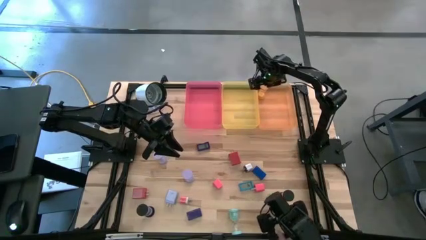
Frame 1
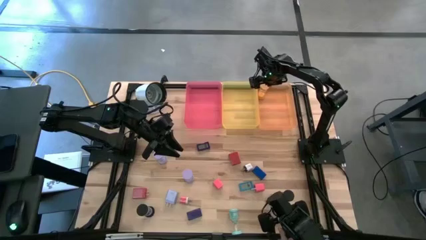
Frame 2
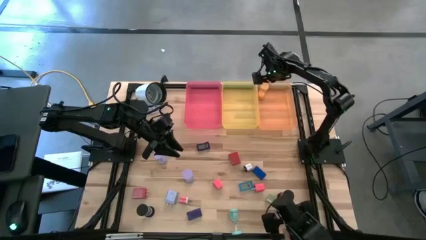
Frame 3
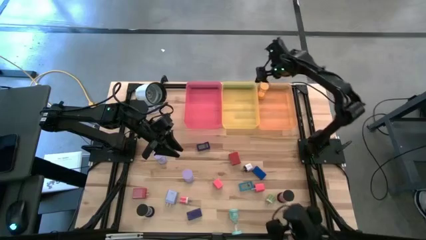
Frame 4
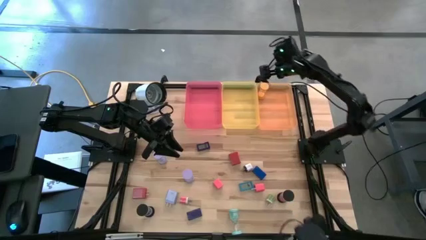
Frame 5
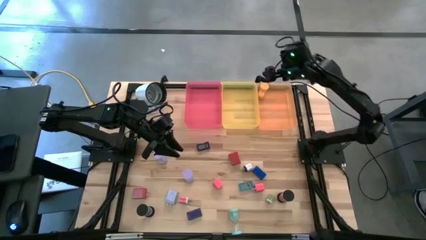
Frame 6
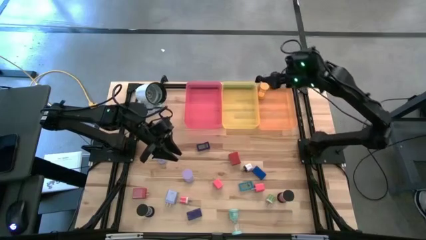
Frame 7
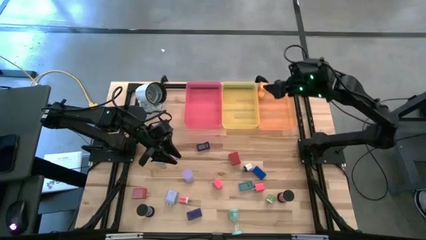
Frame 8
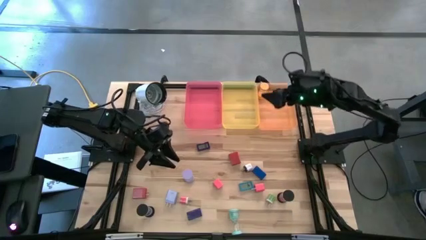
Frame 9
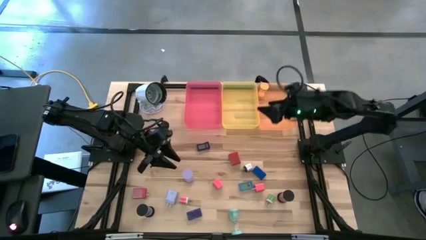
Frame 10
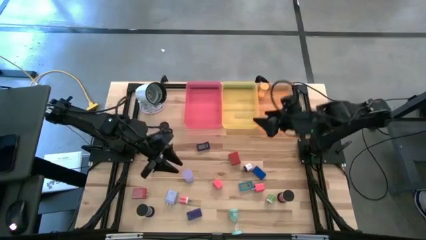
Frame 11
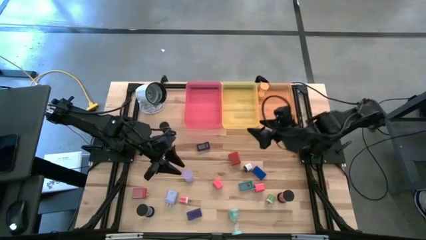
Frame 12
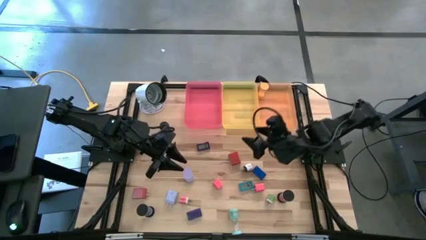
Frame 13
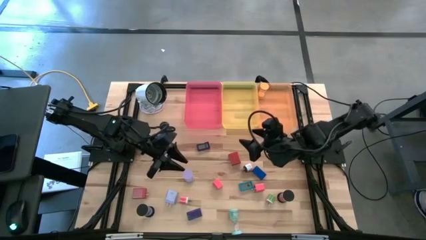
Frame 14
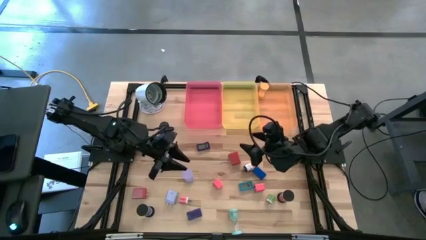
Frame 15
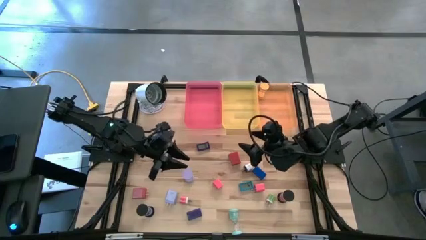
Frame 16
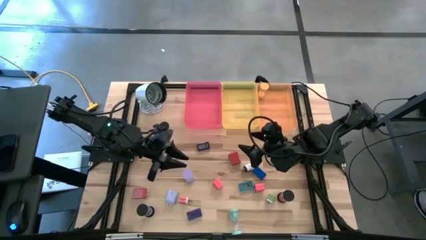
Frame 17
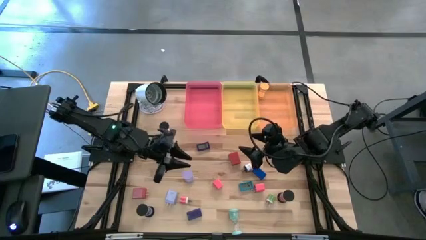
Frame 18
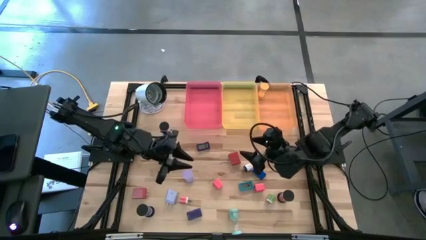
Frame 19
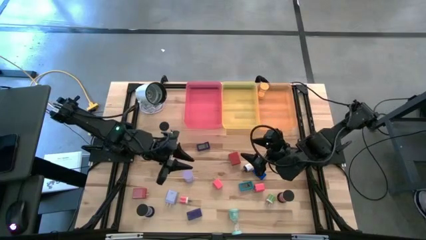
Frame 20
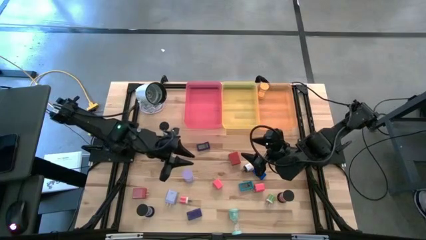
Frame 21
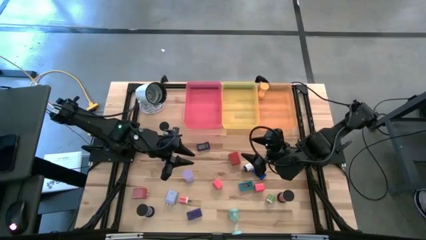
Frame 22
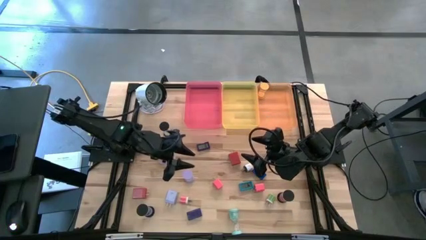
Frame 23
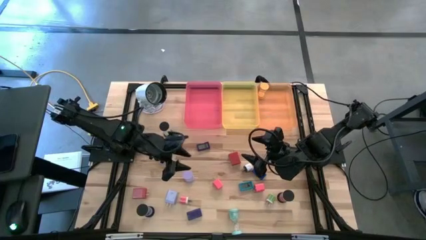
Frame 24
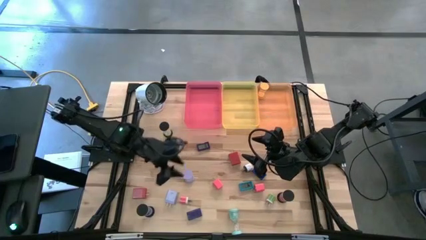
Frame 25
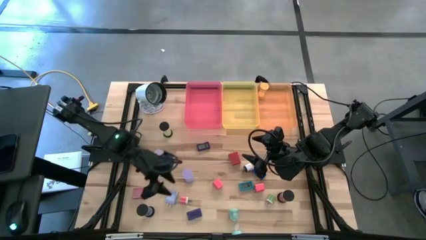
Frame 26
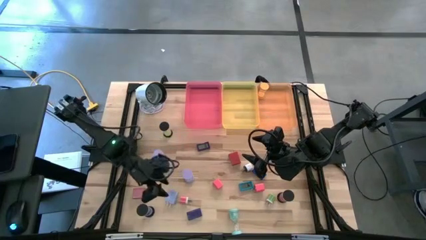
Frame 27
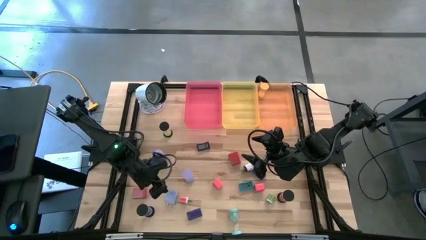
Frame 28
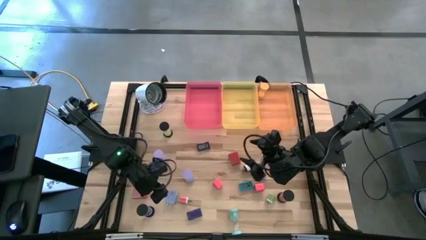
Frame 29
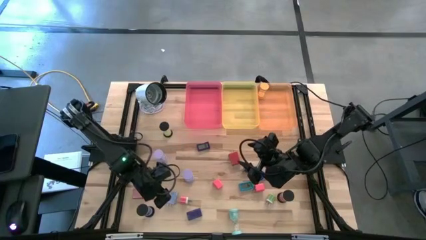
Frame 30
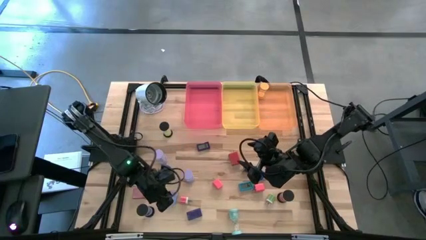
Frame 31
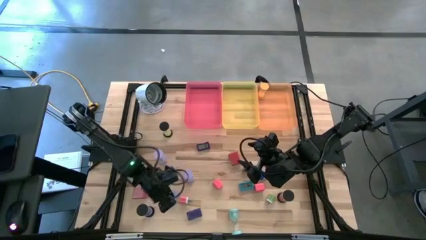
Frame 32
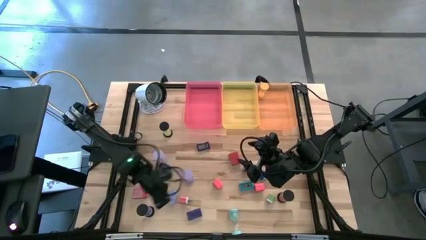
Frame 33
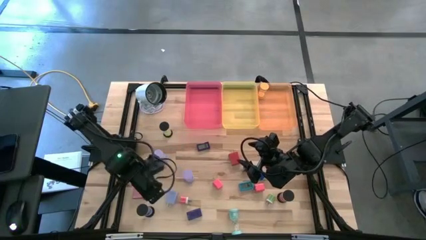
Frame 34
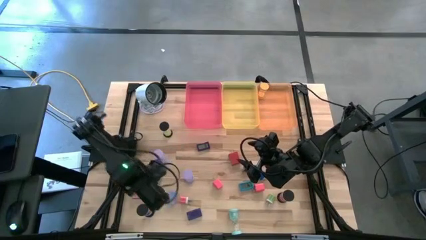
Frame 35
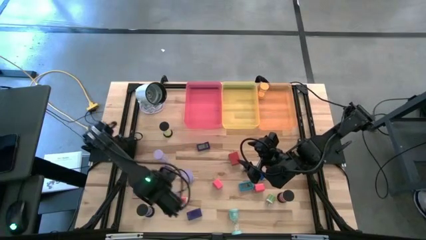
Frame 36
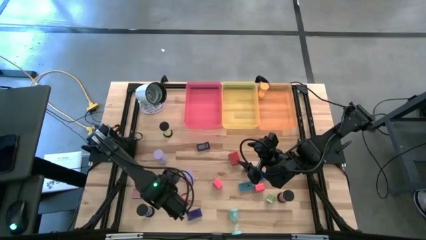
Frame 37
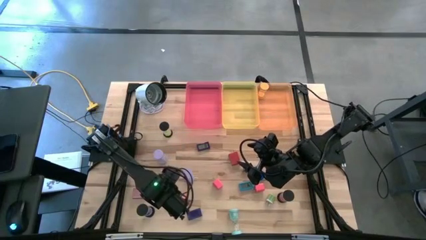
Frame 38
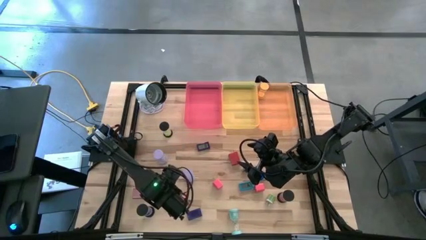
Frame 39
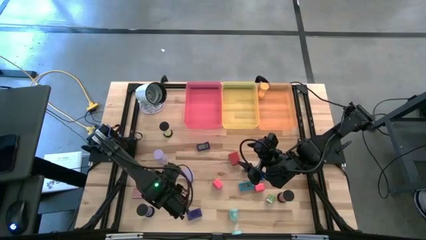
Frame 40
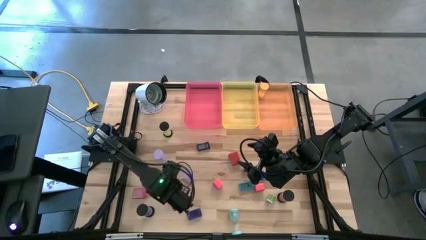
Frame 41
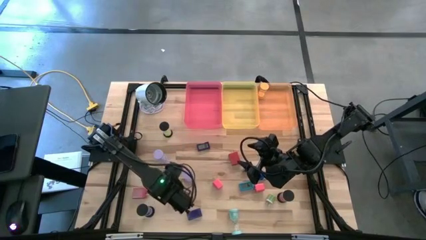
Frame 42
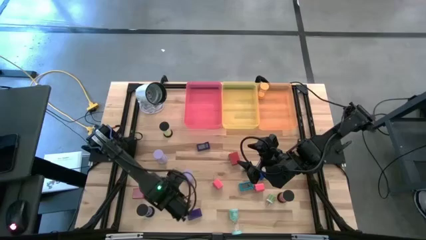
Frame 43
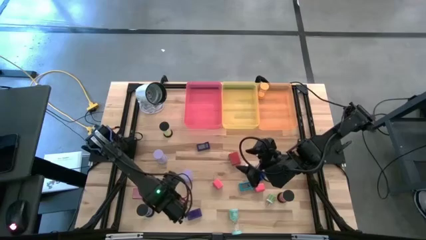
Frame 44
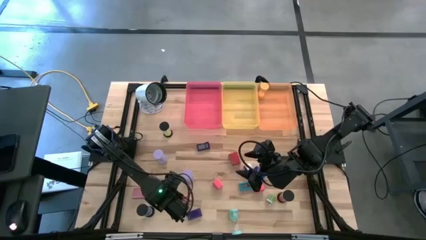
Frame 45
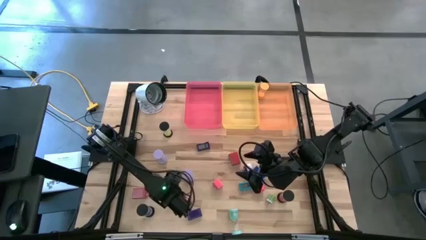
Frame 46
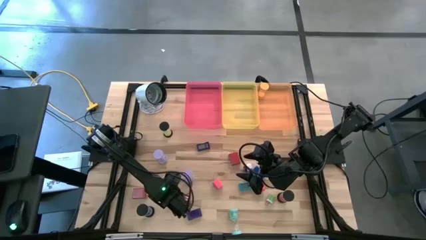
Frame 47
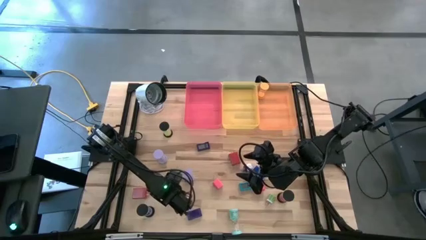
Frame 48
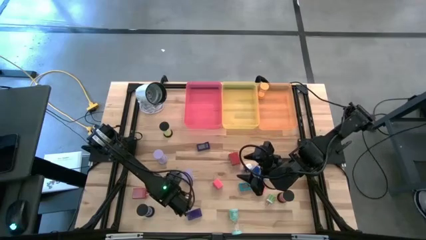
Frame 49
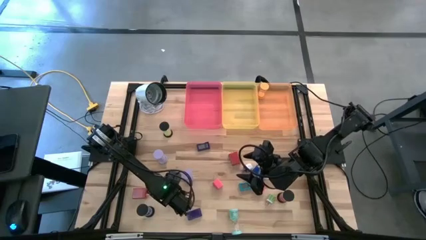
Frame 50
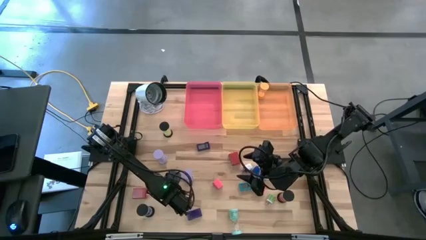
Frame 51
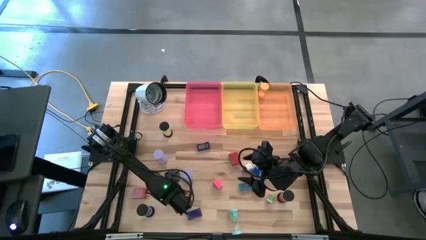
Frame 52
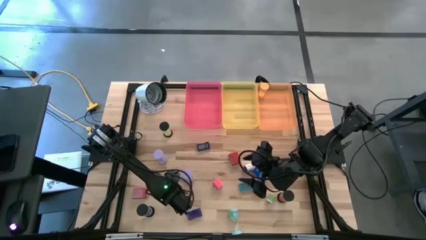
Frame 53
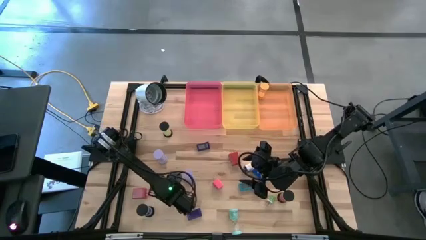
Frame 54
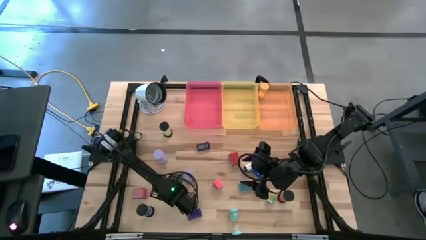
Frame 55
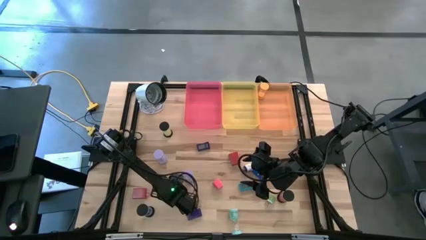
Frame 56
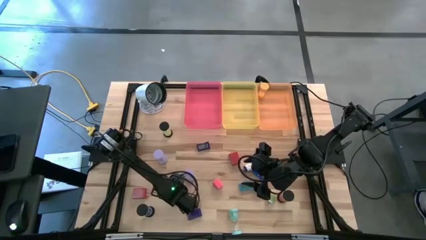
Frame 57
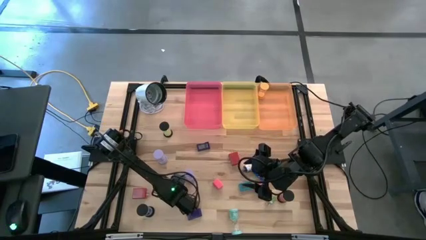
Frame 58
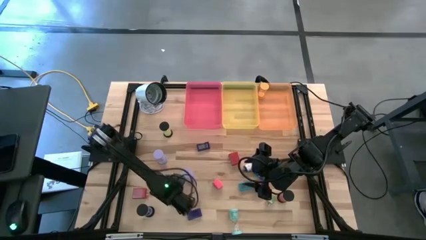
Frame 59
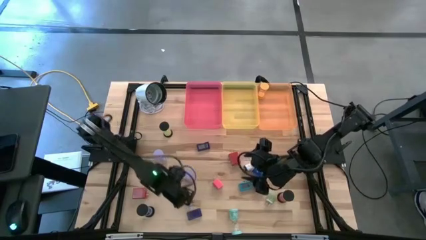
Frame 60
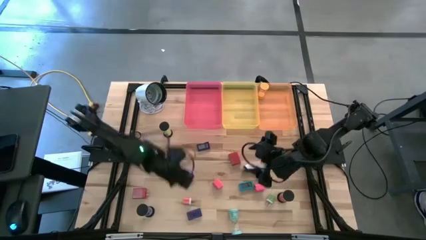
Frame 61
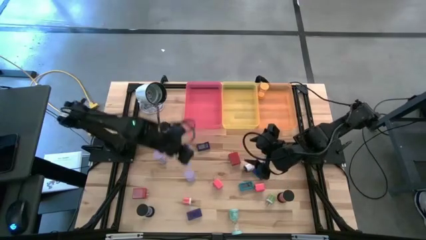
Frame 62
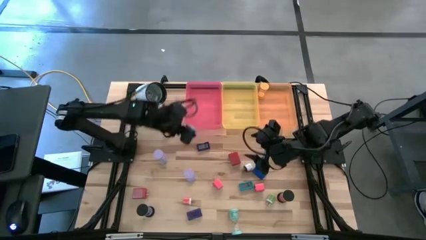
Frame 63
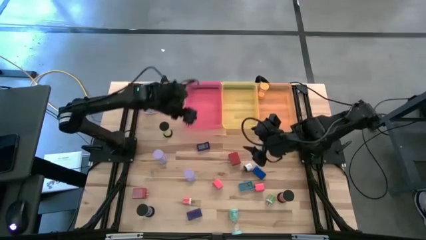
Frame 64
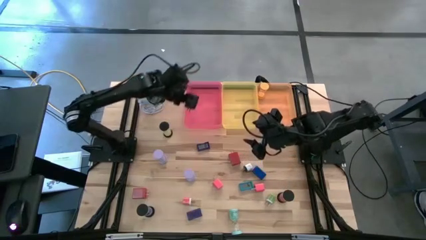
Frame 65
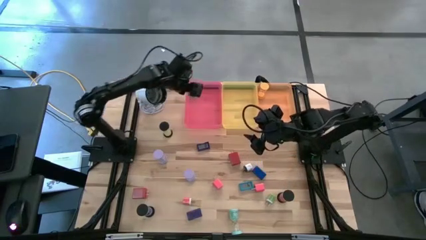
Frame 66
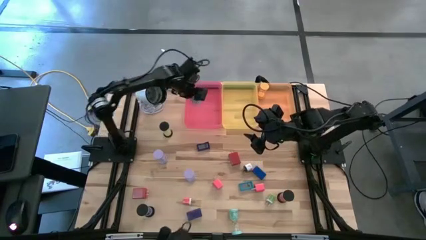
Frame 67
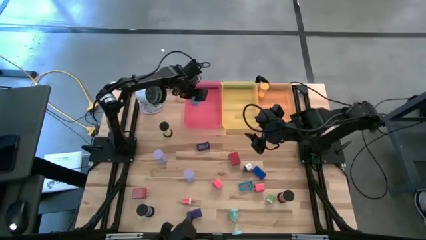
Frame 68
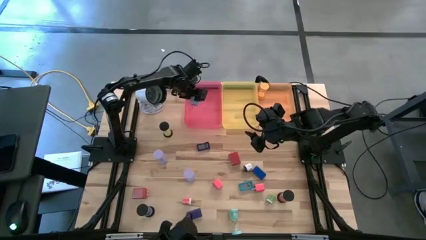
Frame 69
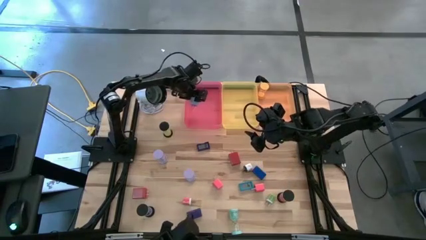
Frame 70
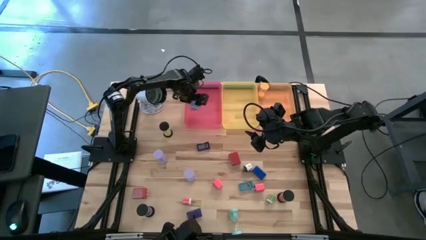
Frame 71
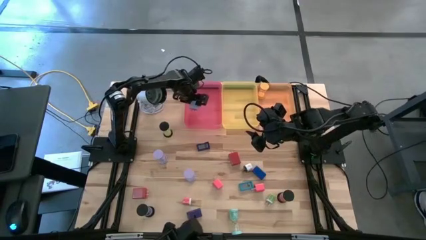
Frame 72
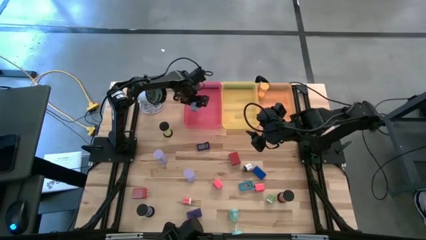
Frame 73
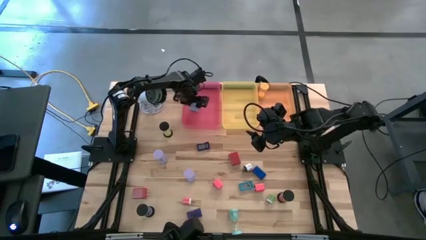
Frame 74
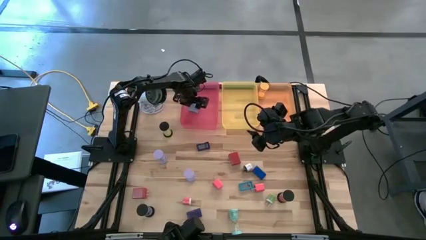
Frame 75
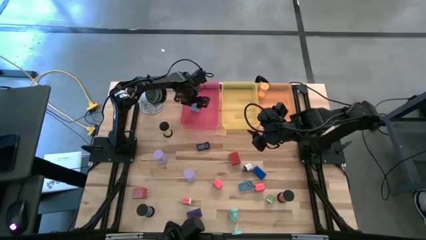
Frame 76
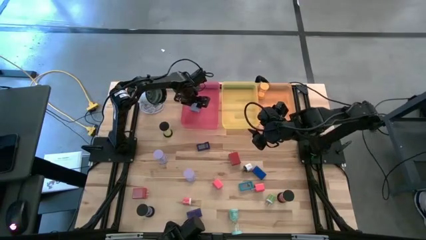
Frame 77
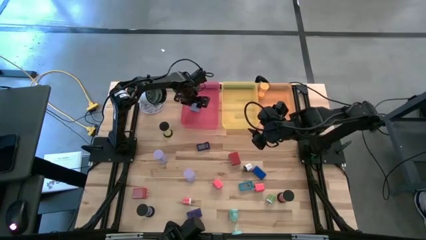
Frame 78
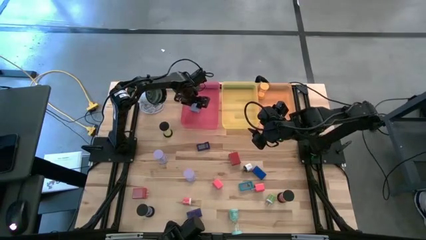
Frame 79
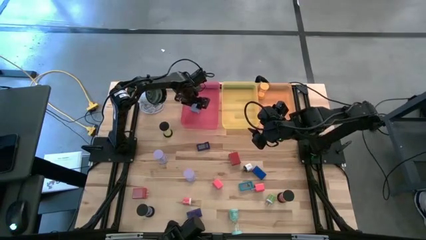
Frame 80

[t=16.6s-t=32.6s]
Task: Pick & Place Office items
Put the light purple charger adapter into the red bin
